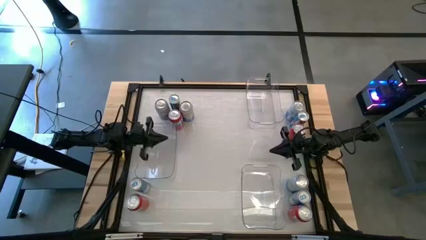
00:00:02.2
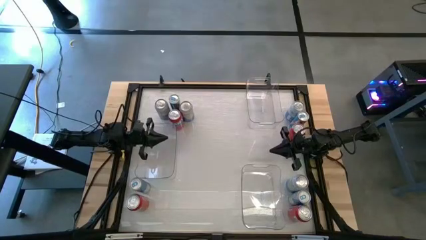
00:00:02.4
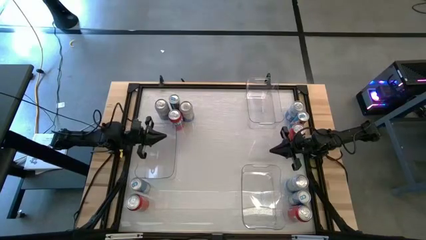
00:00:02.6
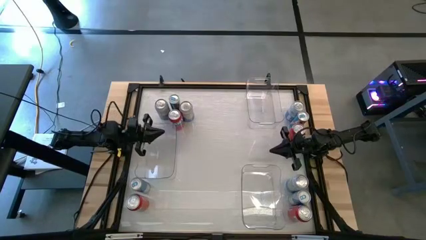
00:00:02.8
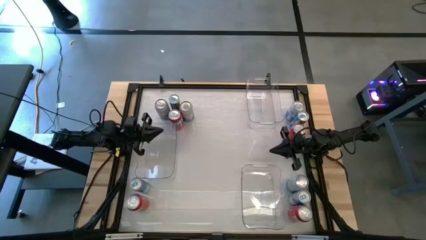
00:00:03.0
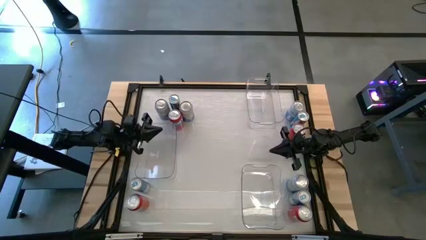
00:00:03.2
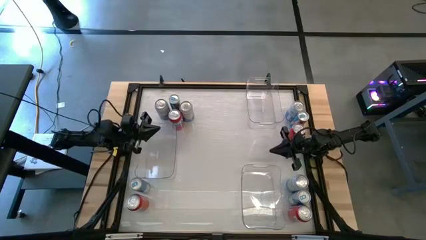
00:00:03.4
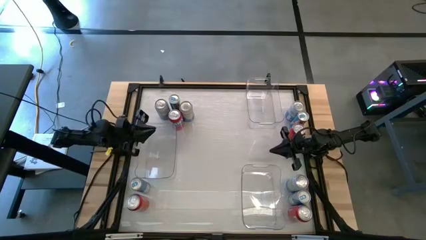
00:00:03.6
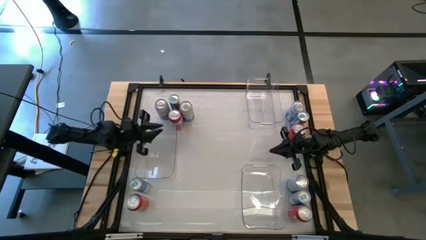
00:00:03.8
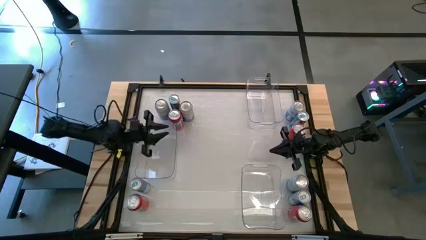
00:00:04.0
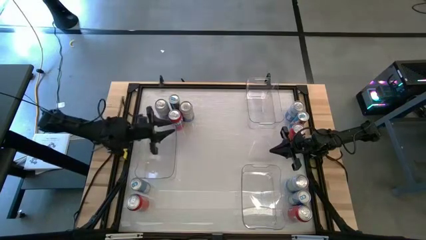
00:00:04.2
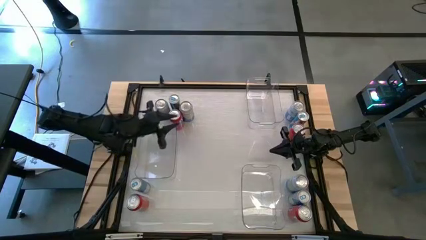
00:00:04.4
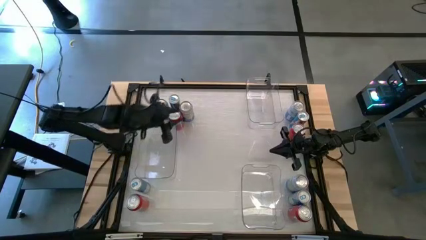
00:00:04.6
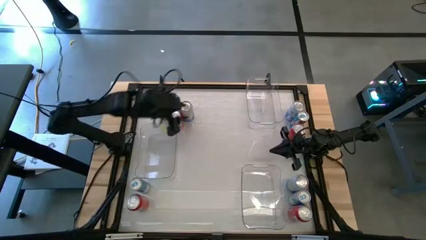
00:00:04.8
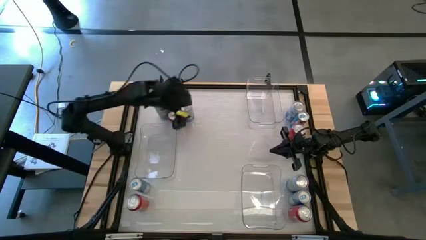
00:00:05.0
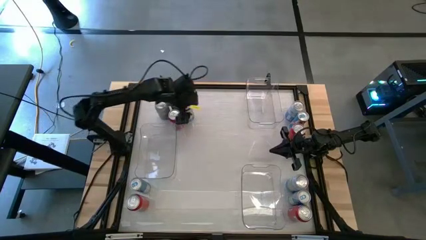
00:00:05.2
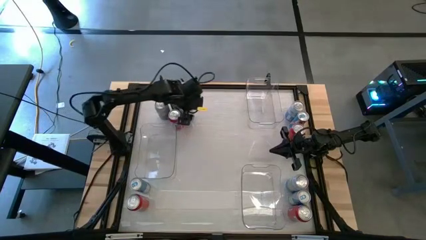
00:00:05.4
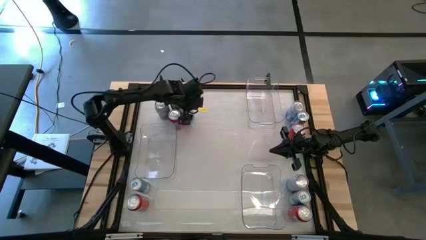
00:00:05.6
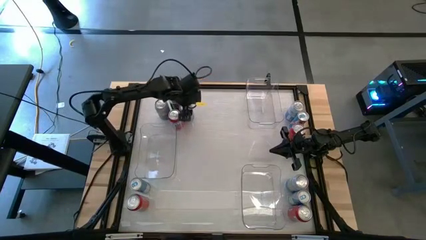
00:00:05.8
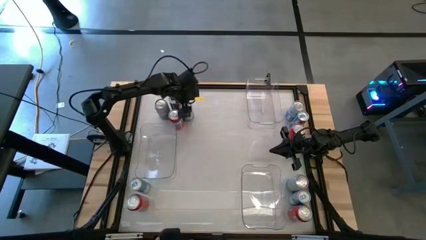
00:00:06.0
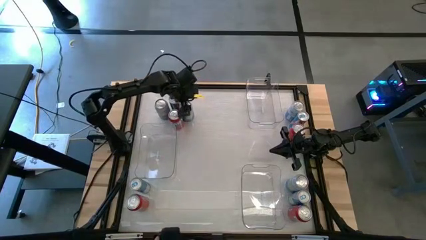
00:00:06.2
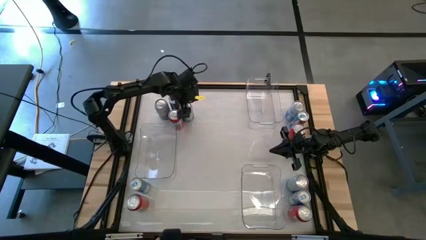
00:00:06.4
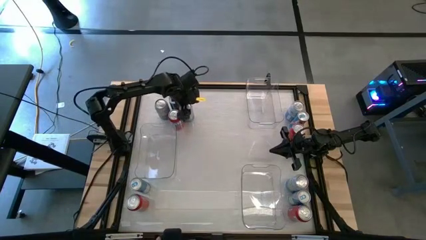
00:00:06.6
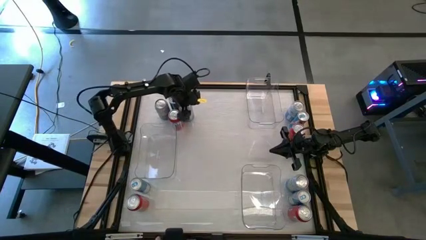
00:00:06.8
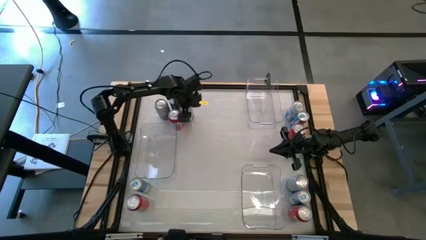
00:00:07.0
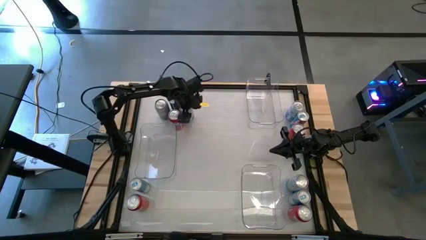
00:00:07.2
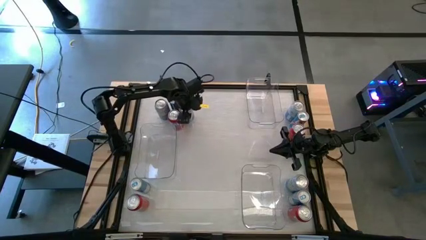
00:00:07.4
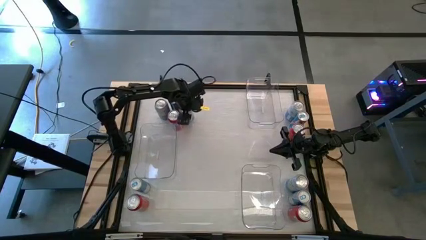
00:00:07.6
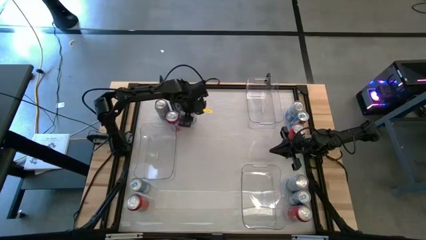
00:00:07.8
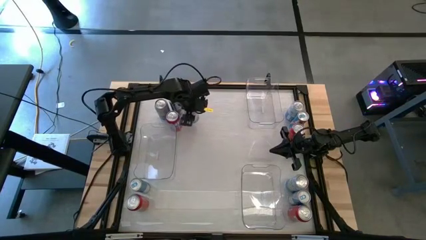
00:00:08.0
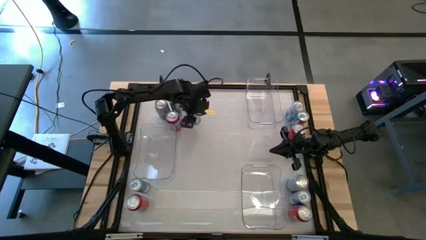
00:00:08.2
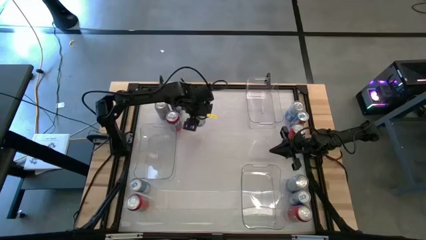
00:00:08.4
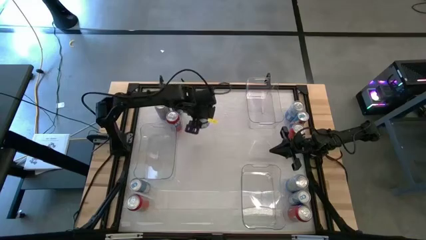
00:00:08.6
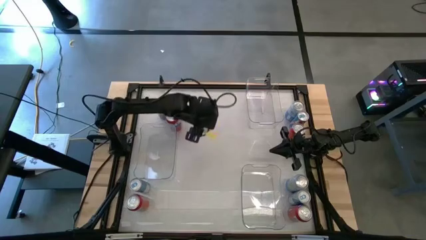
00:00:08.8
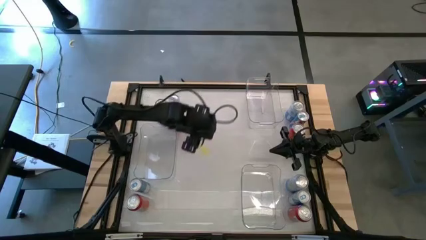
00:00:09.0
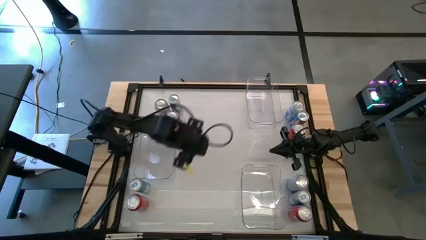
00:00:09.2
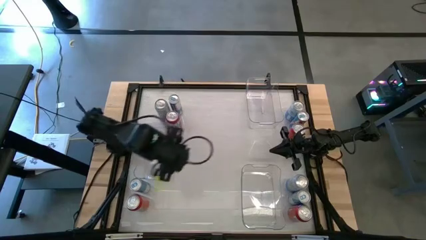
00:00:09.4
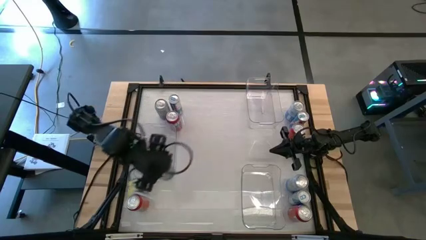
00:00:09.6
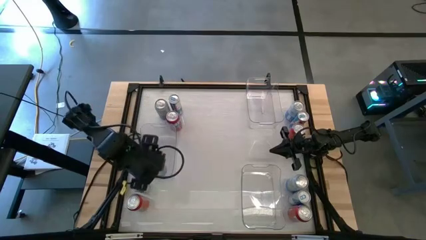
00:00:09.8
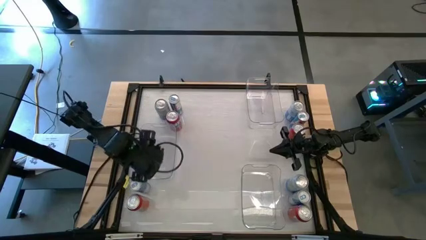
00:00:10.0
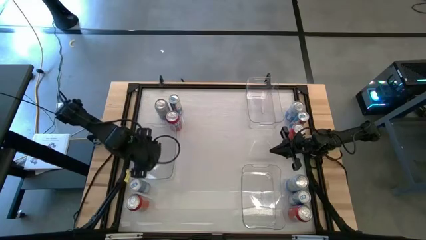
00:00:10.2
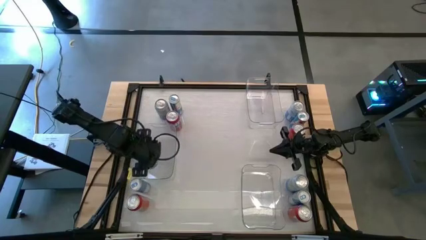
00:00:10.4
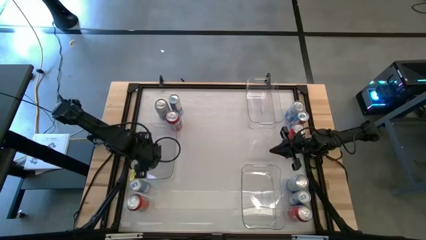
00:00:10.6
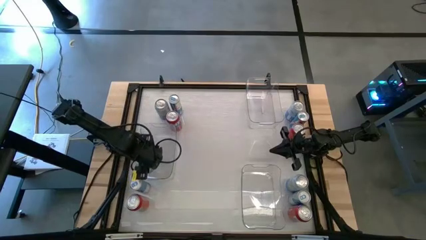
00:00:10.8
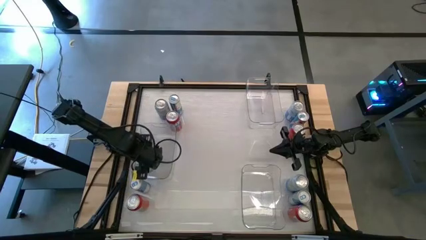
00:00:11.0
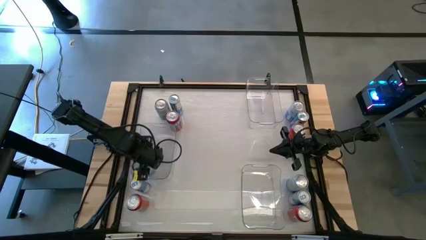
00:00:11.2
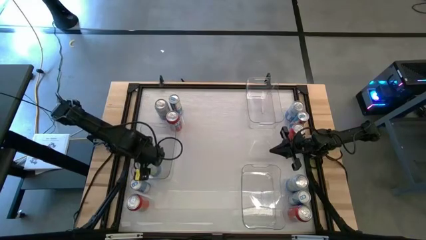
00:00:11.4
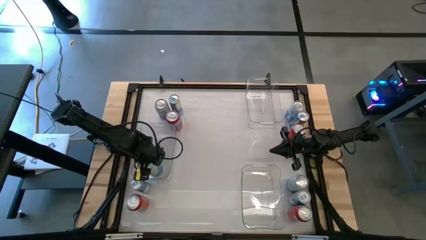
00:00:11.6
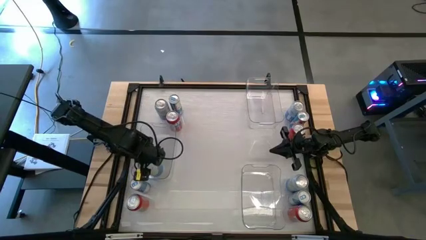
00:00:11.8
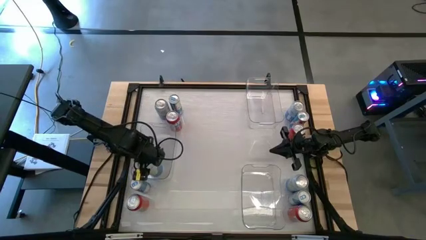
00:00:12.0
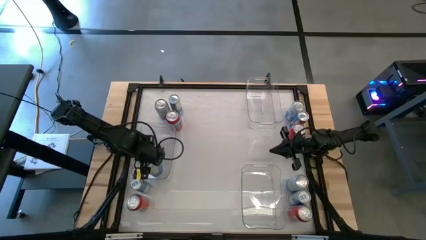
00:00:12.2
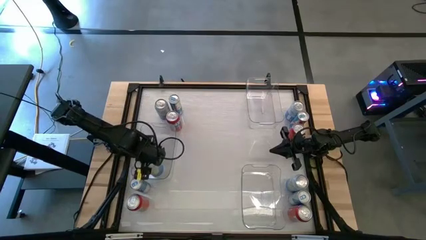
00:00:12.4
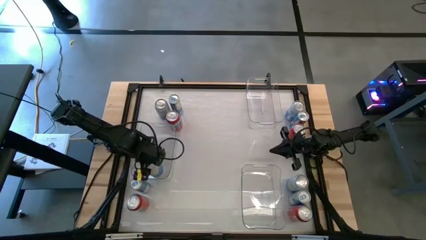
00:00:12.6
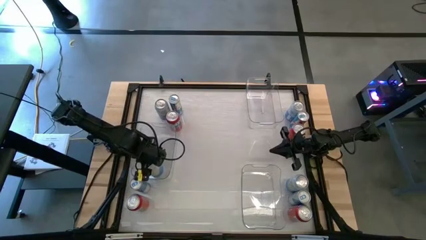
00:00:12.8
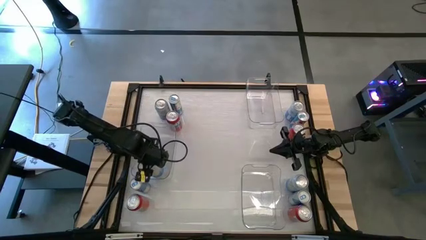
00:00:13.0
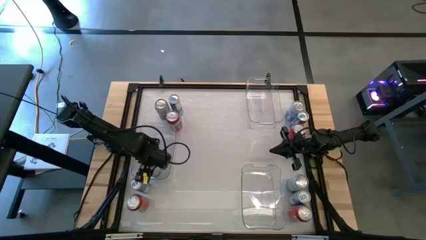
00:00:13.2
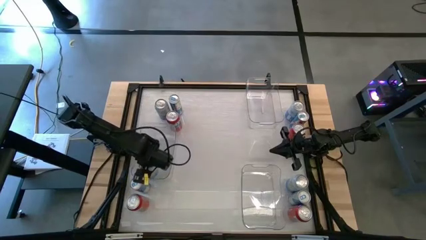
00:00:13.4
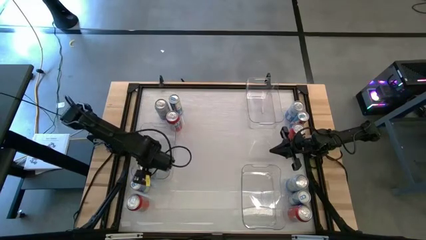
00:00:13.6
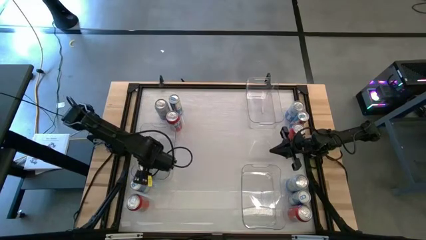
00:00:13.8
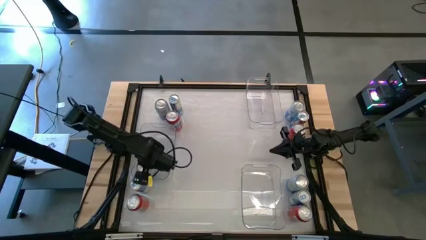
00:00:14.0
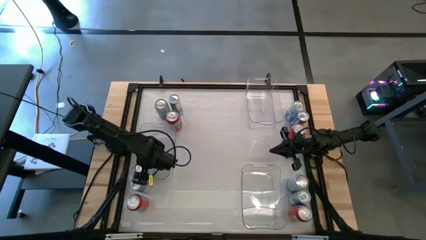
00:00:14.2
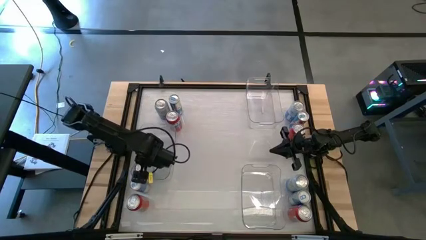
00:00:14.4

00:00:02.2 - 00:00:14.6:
Task: Sort soda cans
Put the top left blue and white soda can into the middle left transparent bin

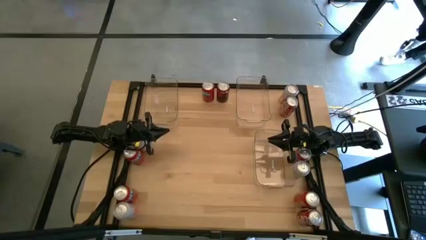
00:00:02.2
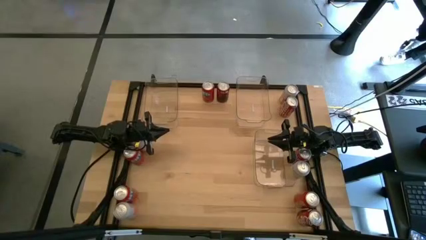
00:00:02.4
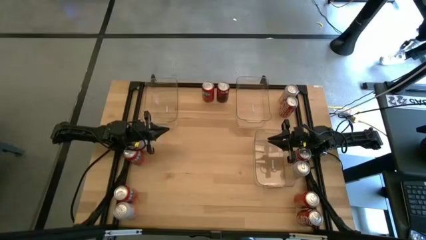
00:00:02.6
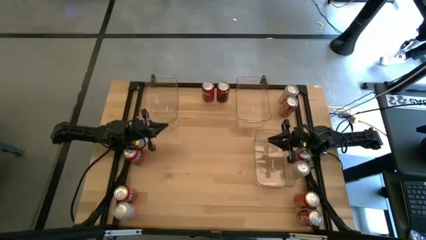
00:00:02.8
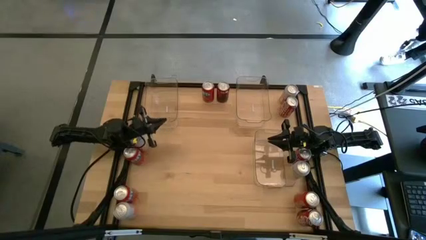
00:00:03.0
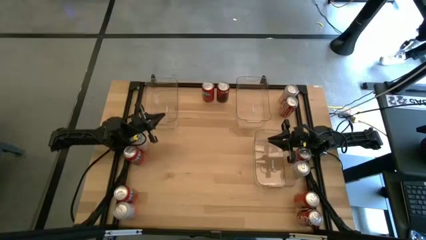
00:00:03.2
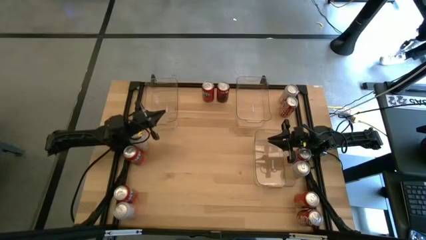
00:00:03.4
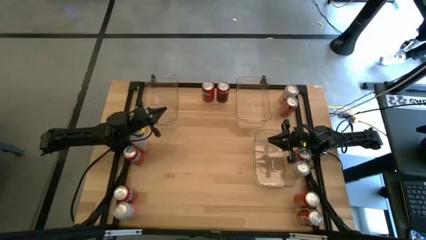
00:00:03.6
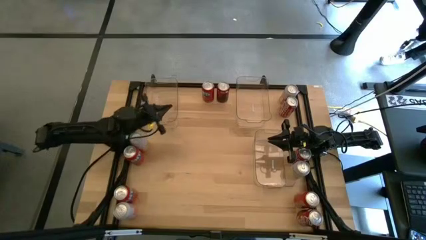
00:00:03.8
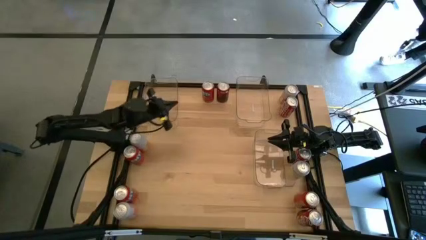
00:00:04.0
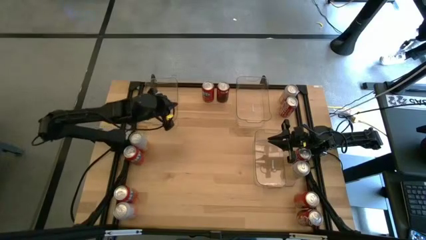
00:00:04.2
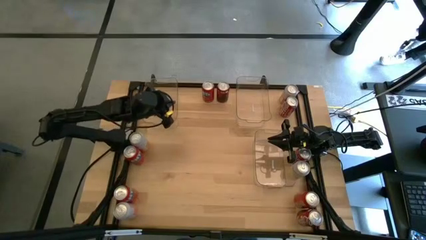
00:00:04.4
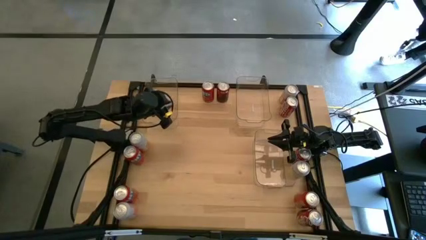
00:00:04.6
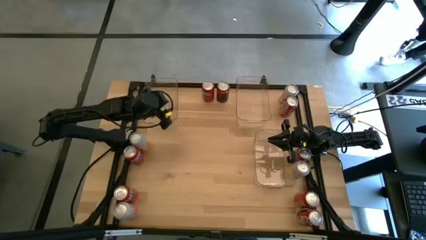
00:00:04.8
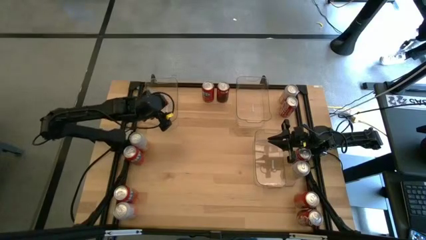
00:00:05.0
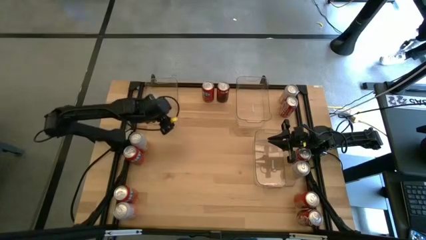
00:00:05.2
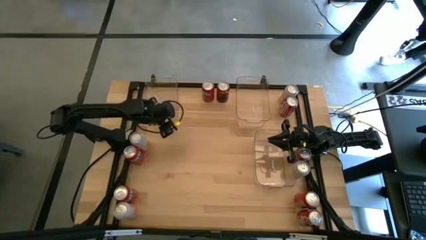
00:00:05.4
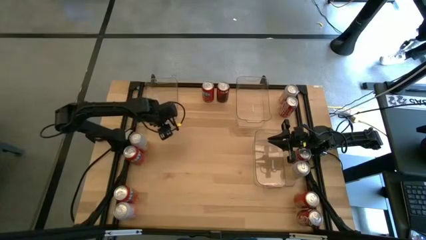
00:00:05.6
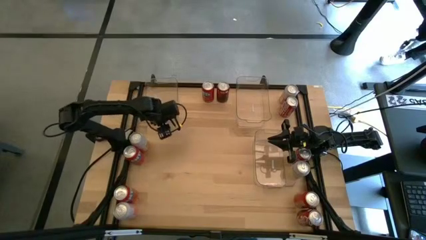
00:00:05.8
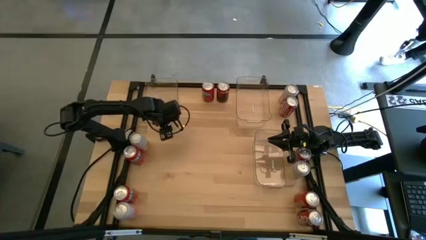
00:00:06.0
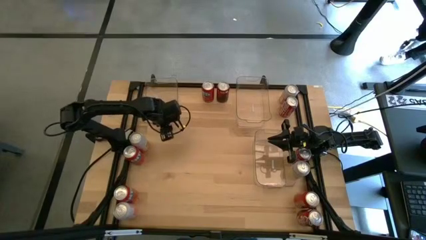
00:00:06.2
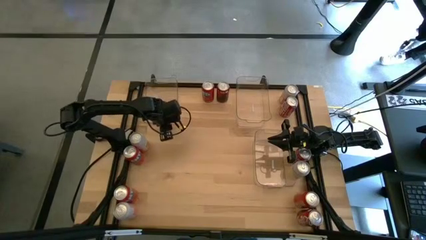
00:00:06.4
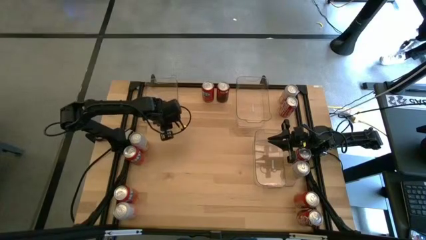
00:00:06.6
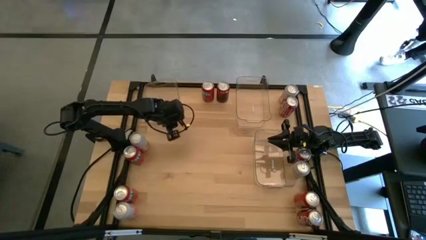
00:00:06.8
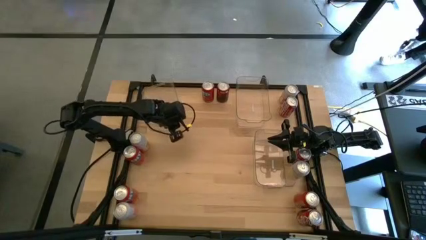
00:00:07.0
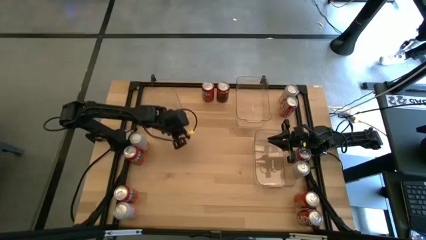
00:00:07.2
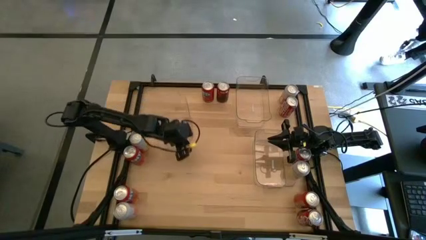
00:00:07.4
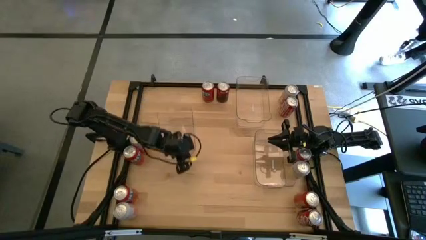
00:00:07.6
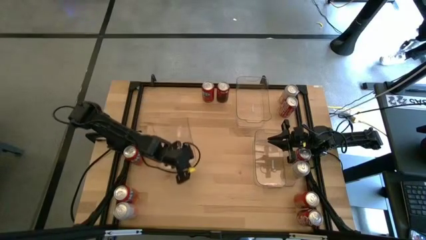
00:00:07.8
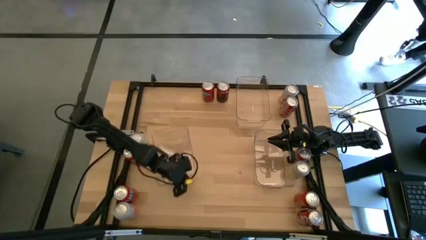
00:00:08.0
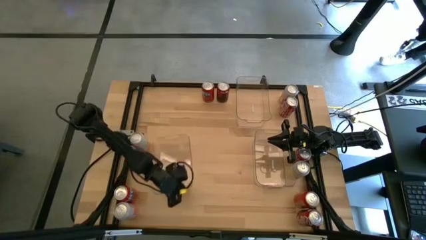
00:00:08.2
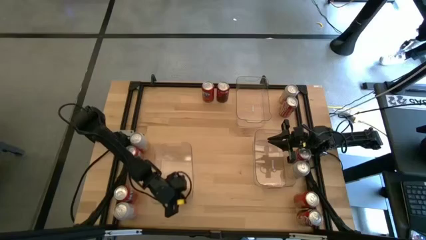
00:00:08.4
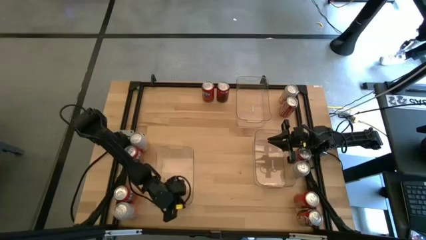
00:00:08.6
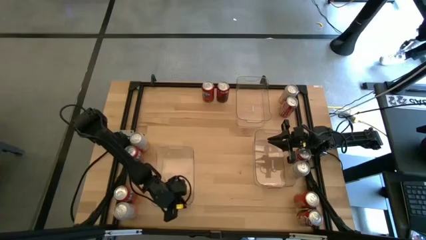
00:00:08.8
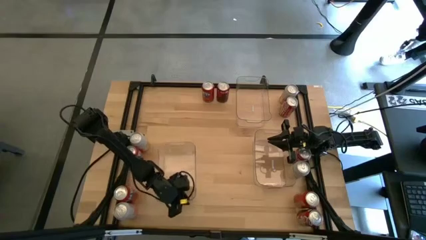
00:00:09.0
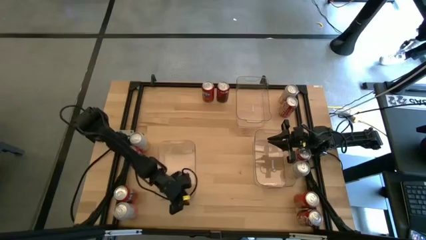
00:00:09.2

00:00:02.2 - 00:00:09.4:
Task: Sort soda cans
Move the top left transparent bin to the bottom left side of the table
